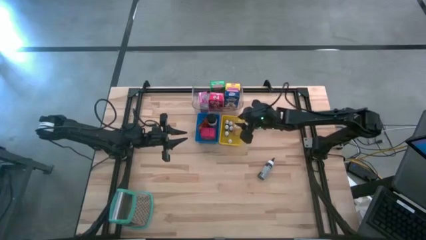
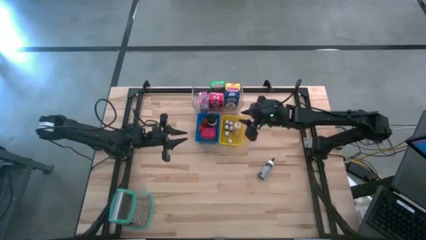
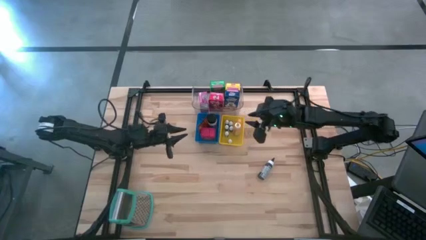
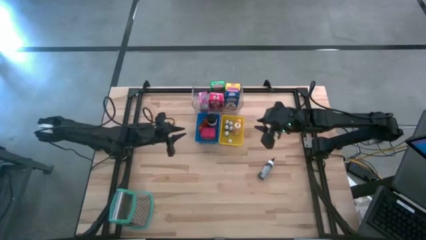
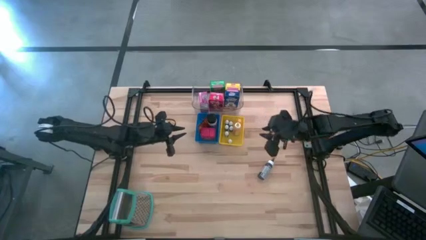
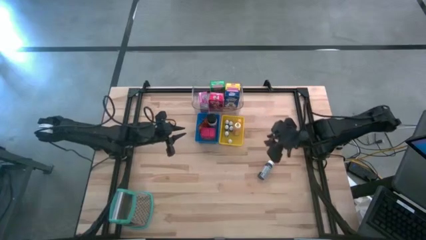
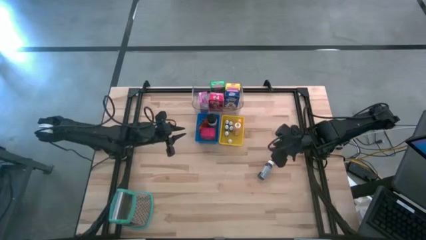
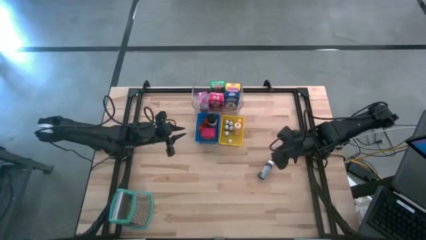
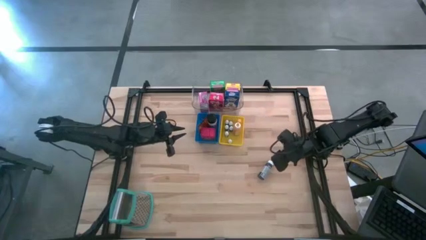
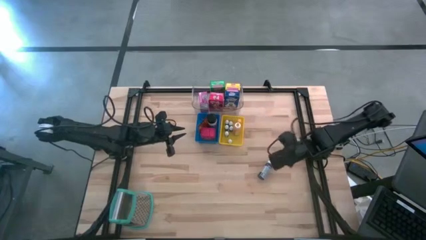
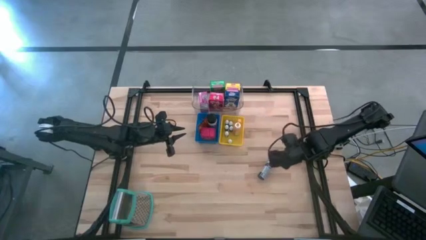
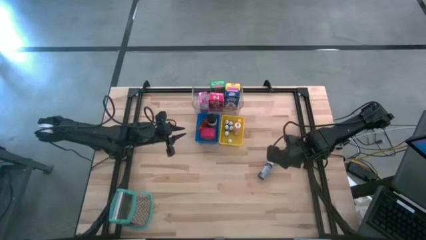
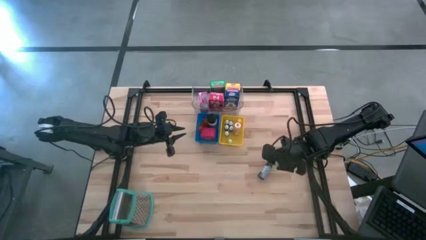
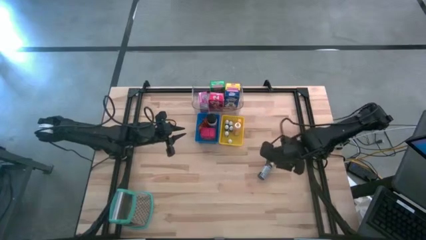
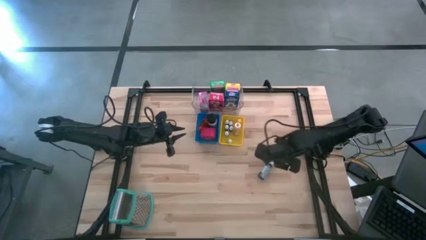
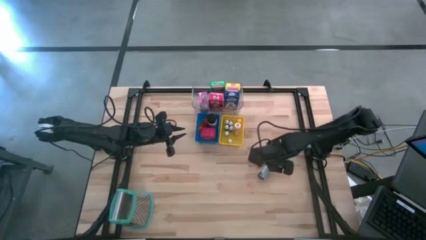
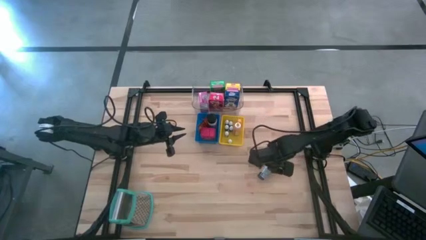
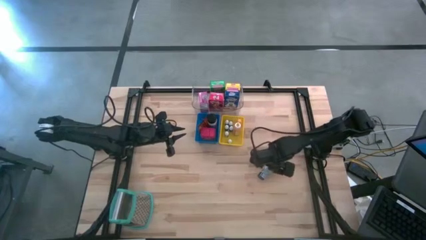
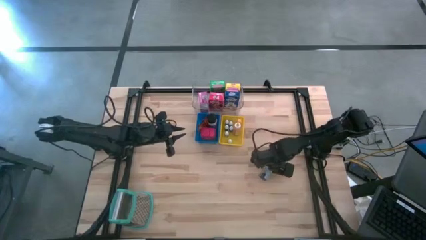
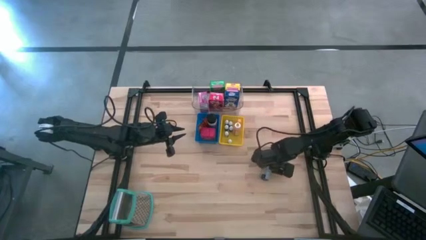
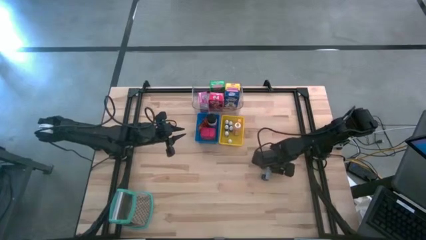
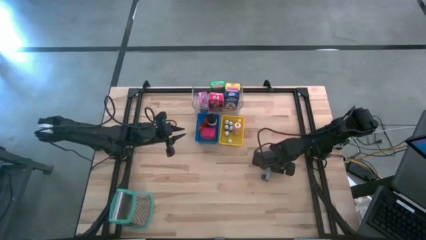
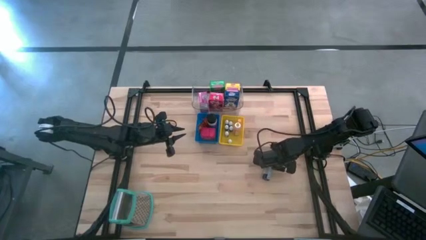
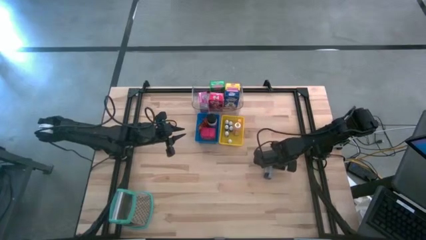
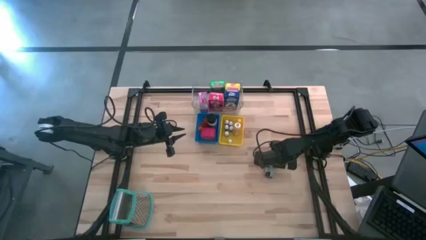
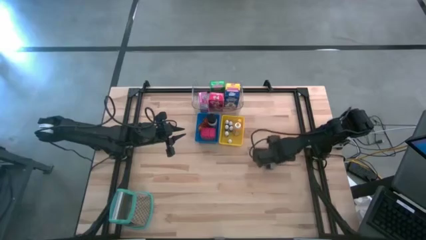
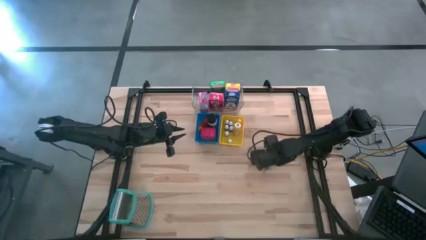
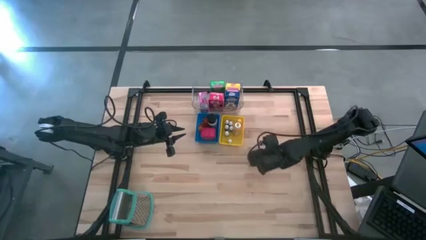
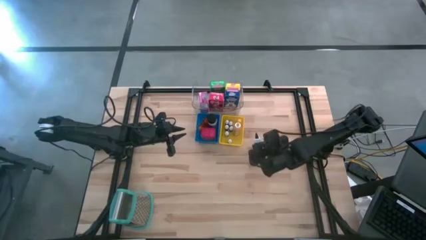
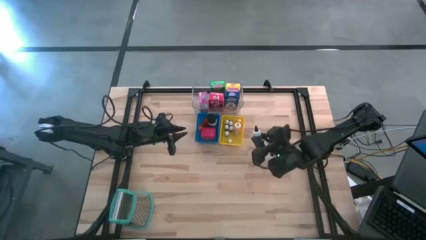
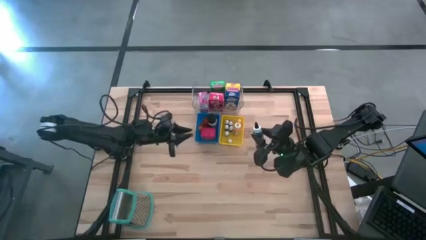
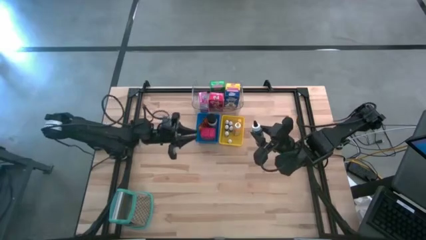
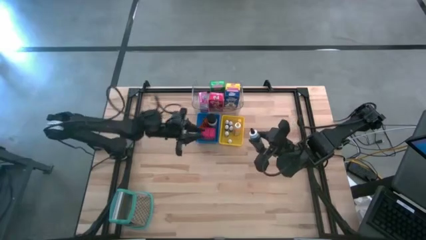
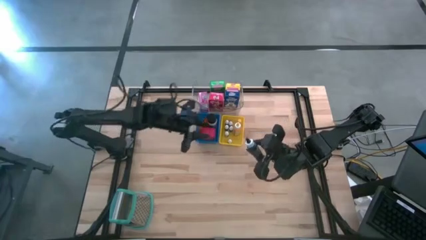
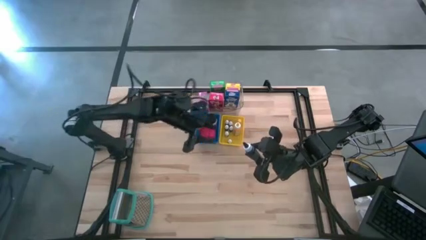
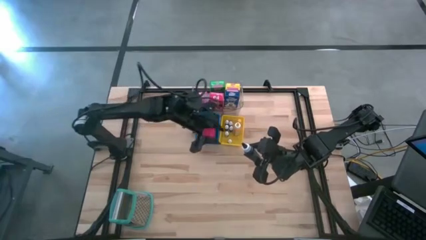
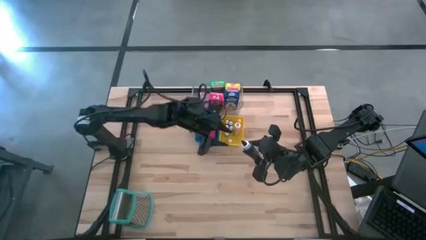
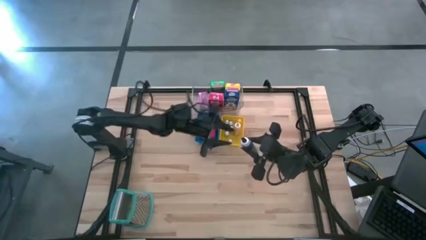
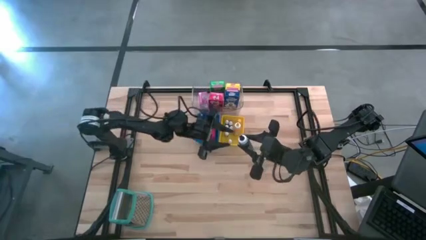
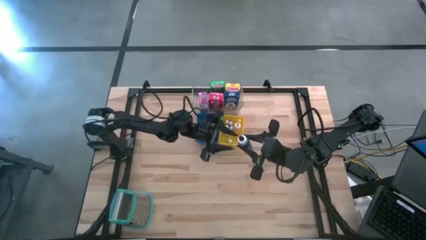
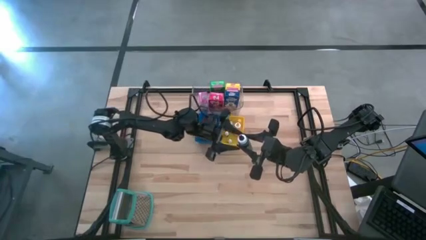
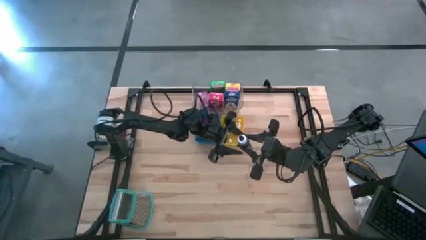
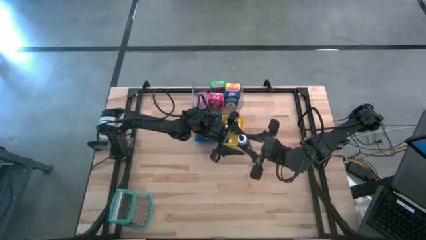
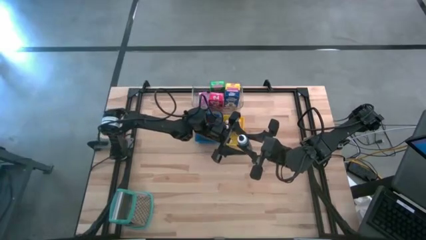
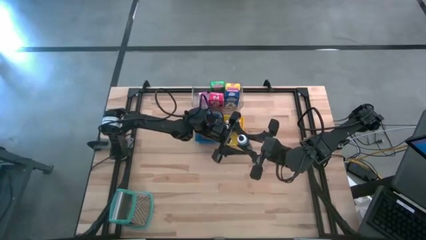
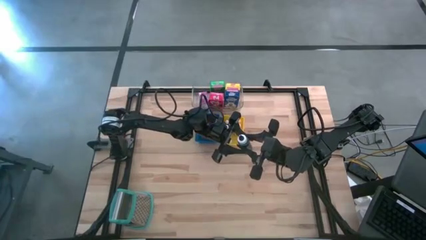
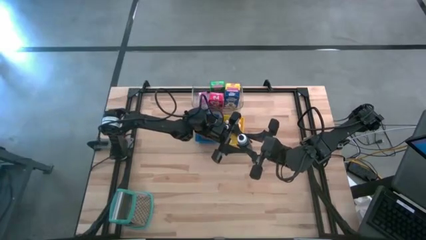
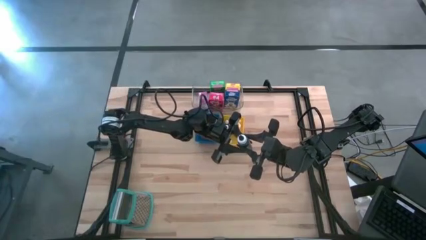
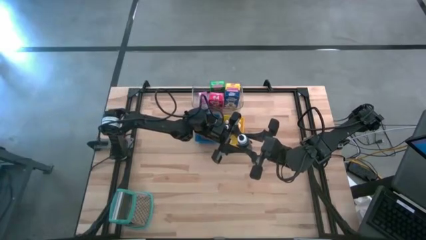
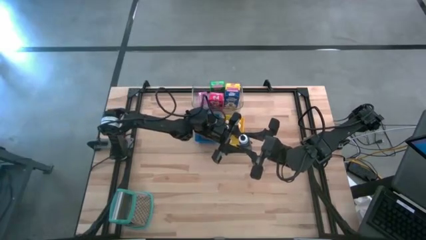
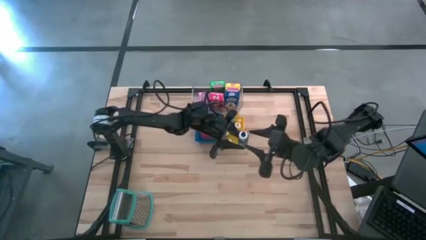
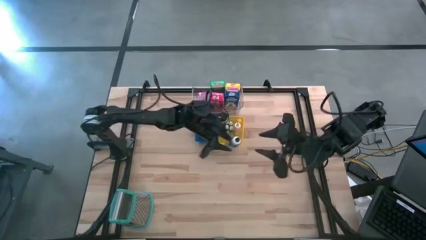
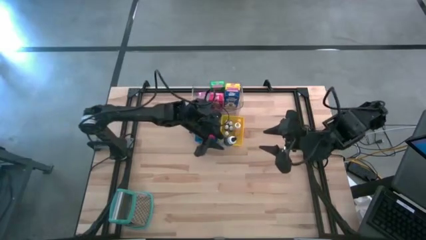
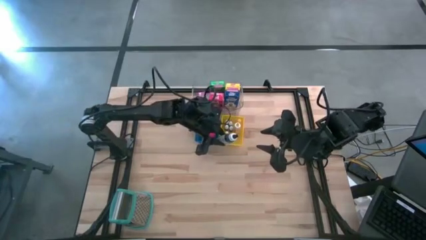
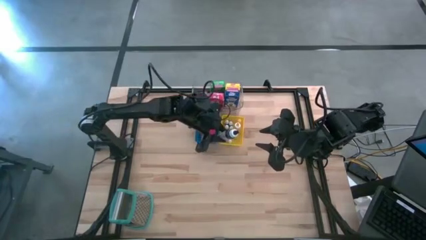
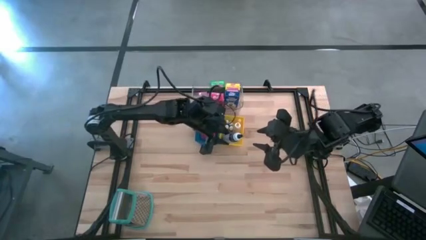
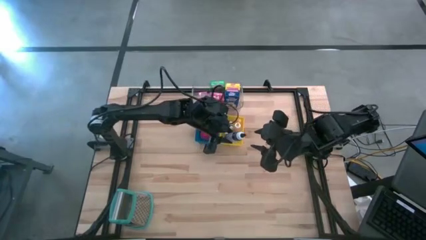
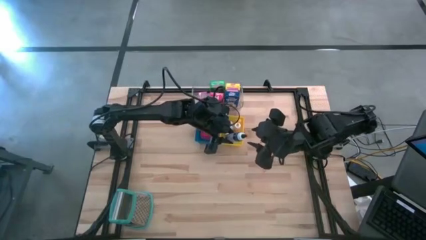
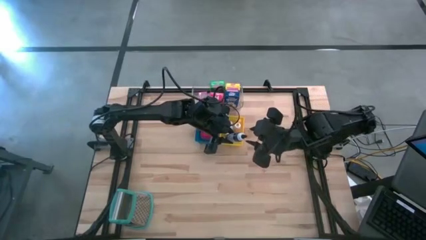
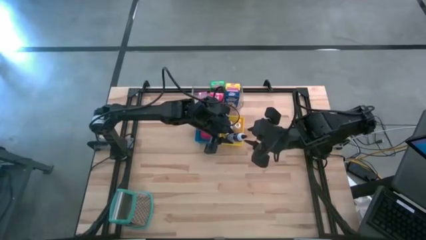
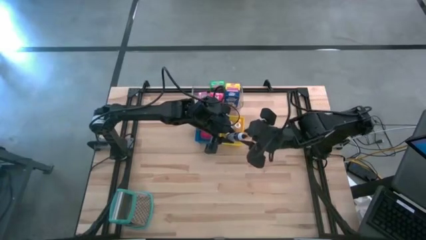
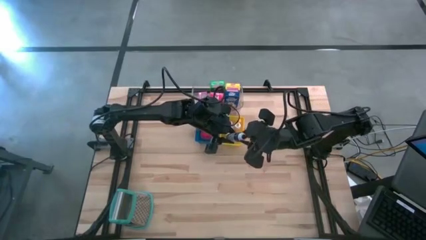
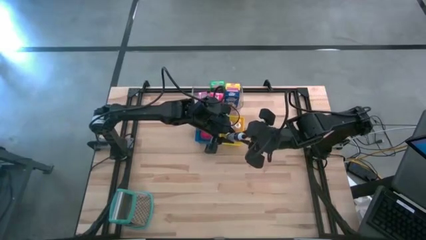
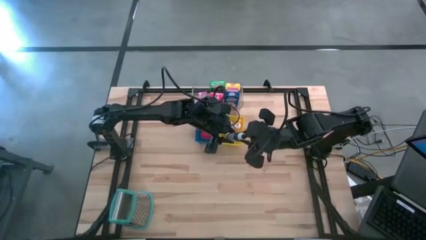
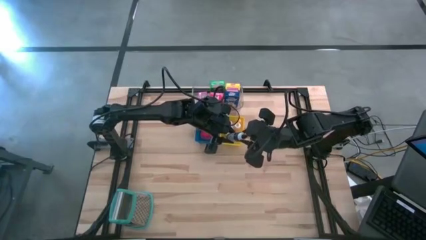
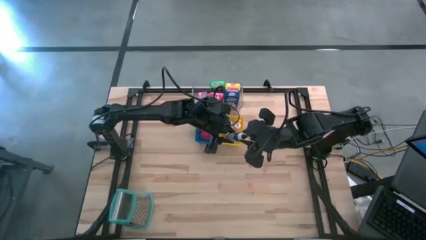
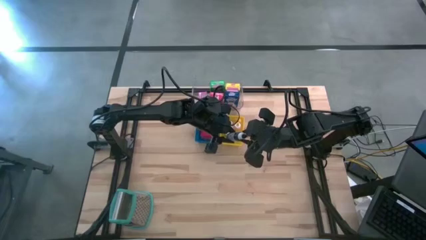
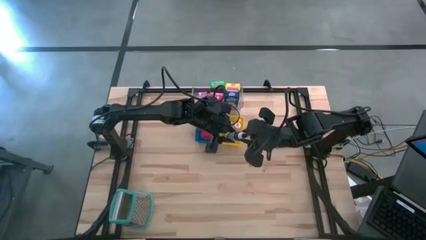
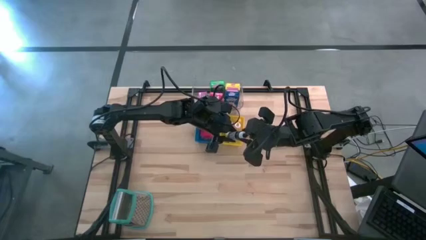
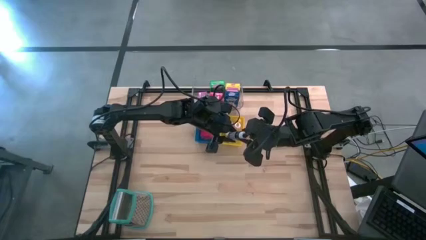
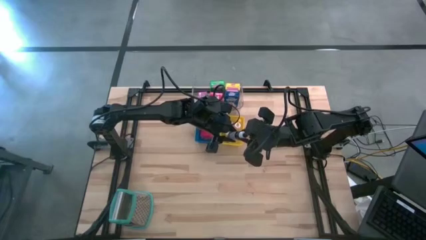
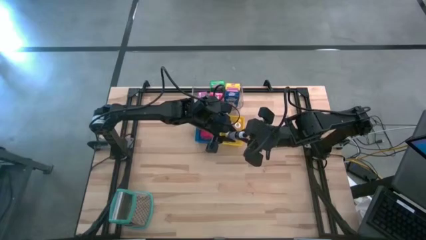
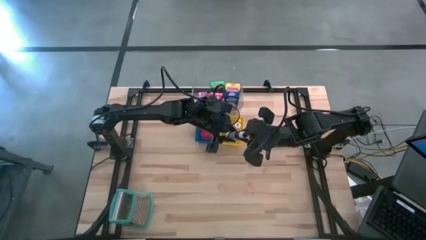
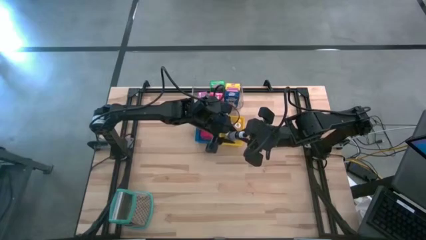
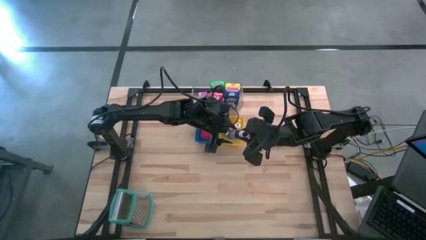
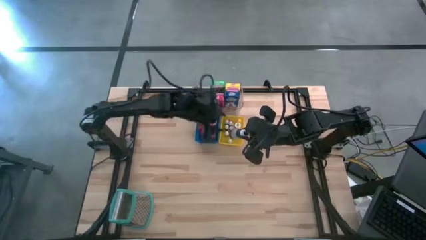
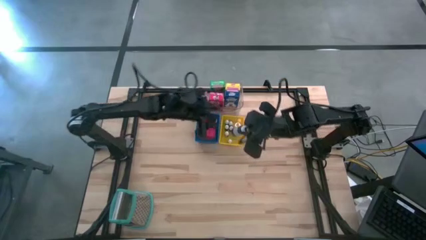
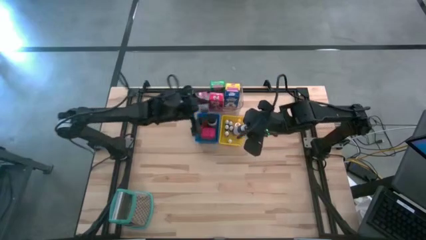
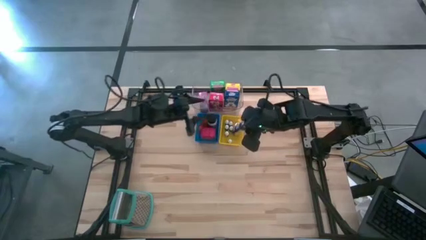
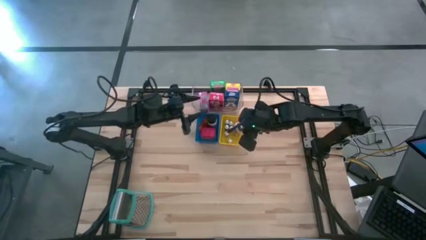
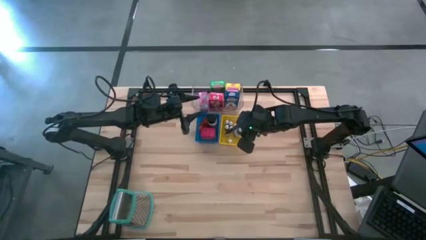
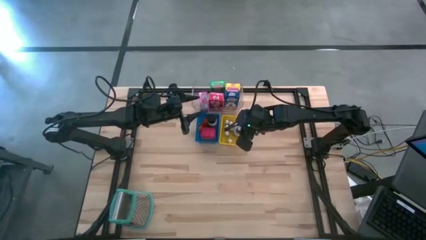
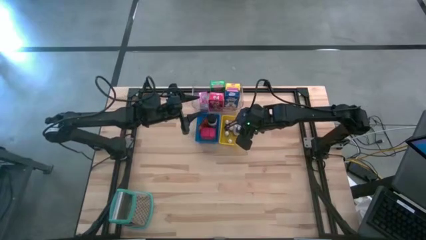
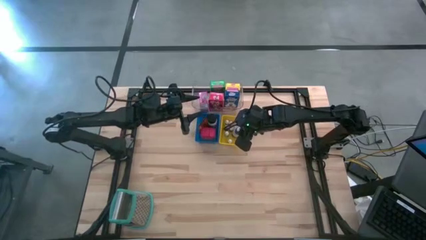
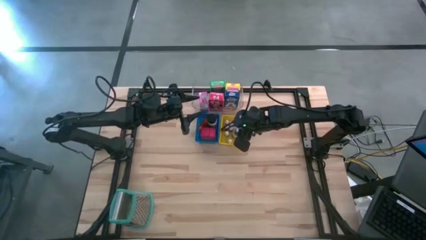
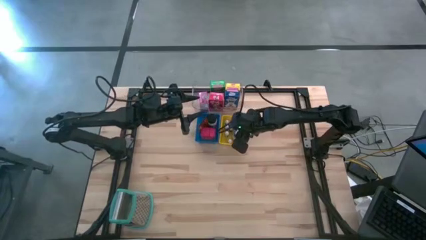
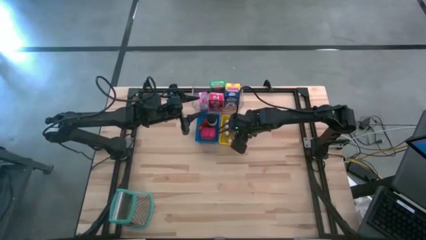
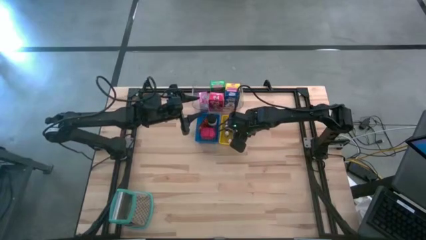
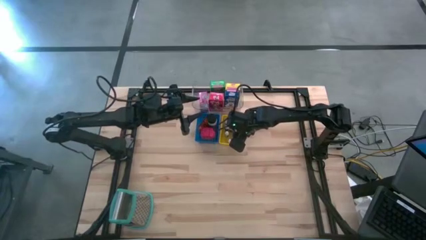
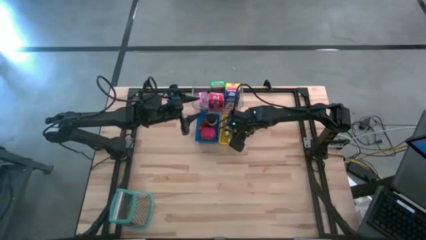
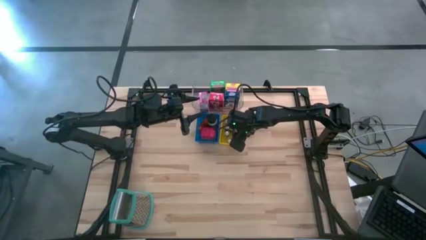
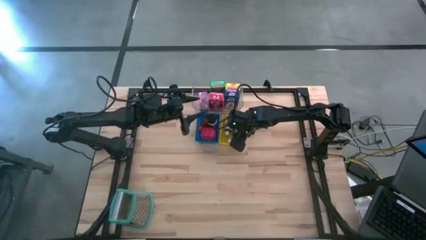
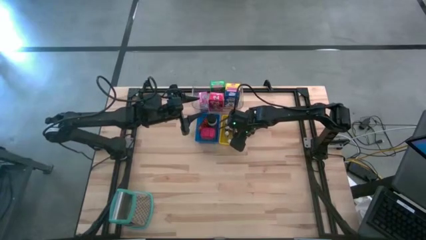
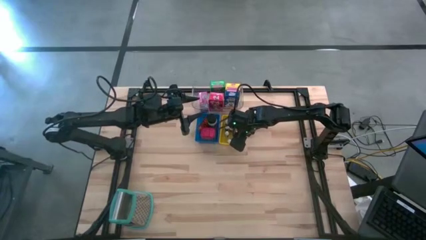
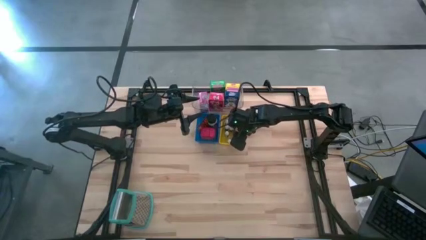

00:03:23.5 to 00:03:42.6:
Task: Pick & Place Kitchen Items
Put the large black food coloring bottle into the yellow bin
